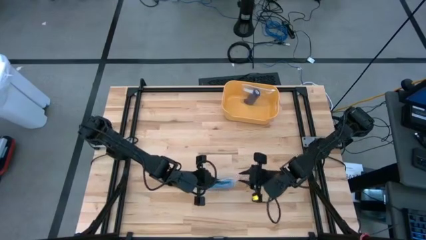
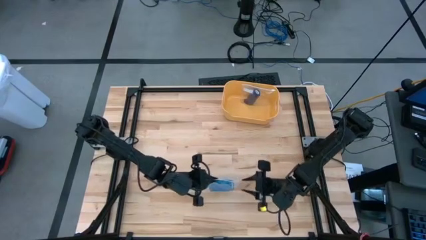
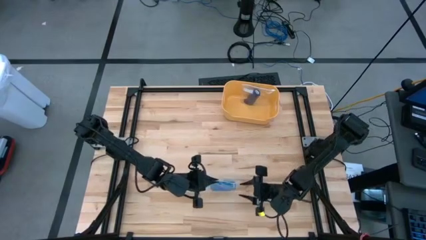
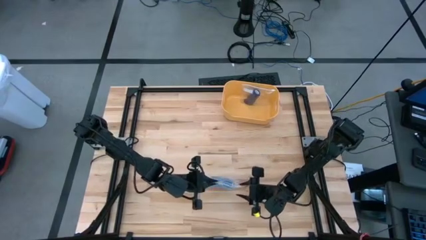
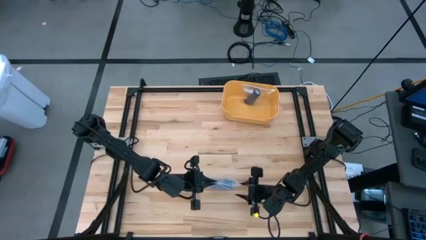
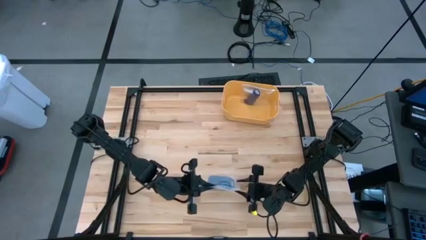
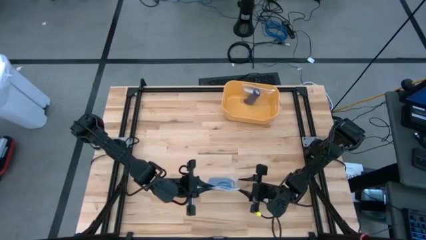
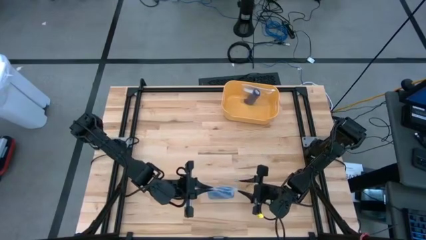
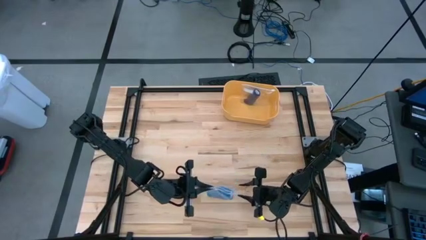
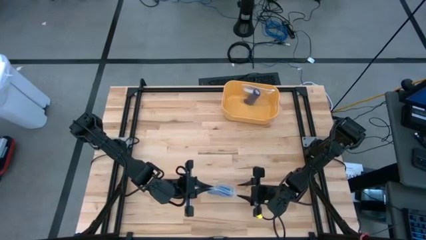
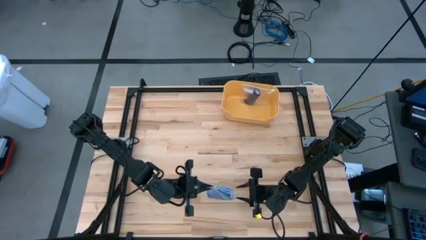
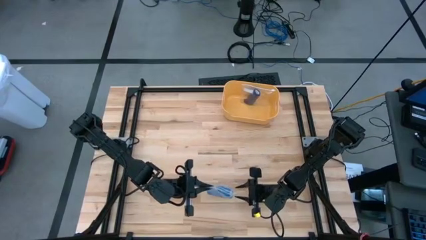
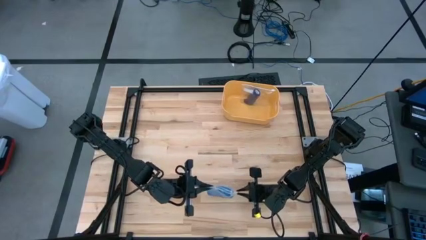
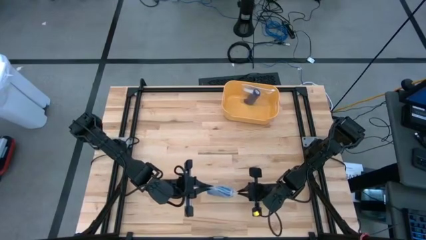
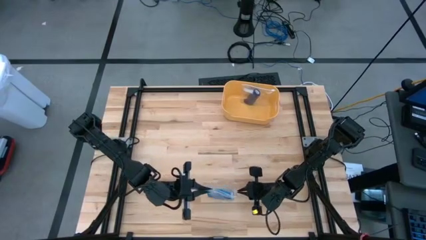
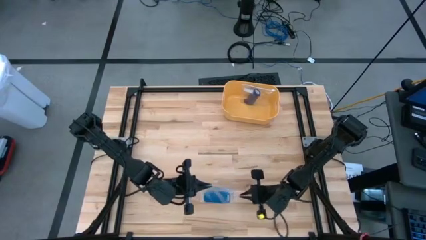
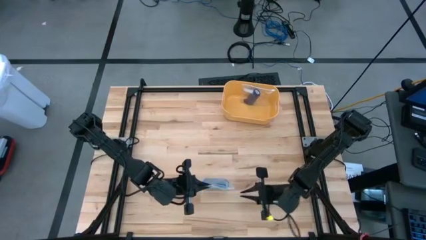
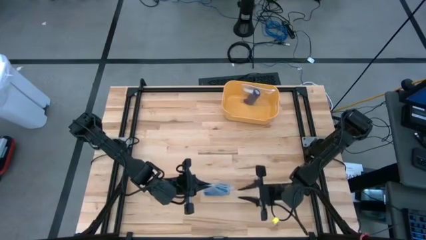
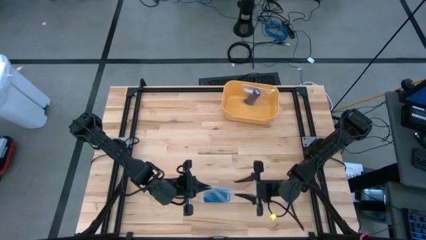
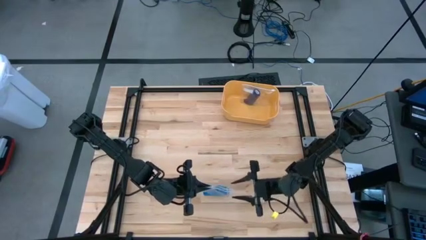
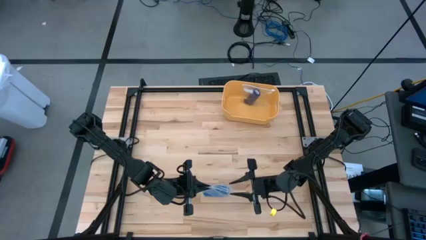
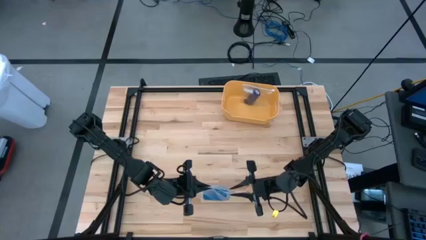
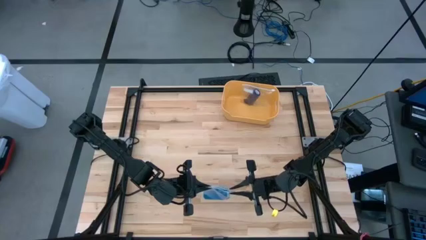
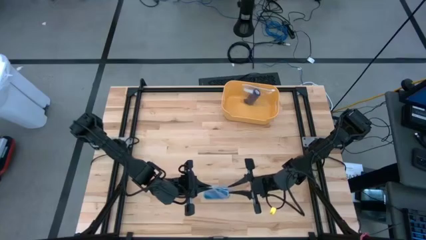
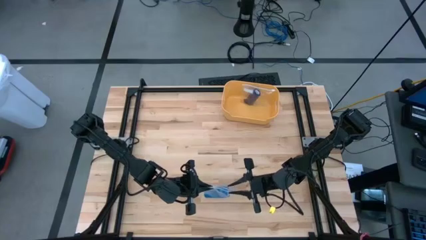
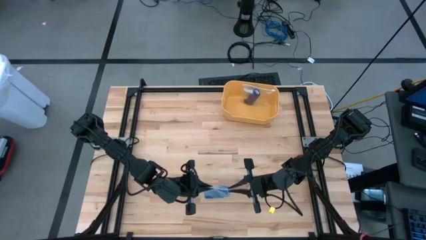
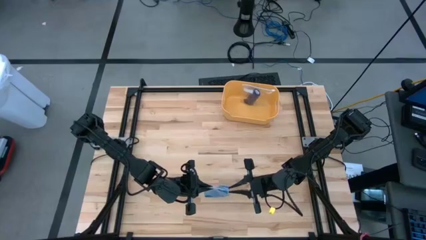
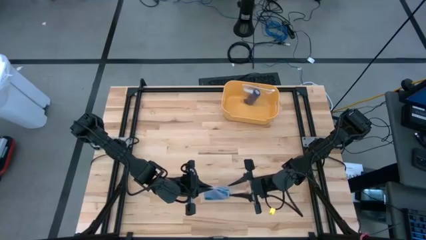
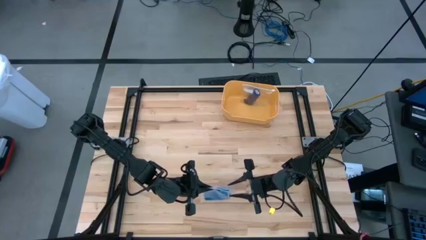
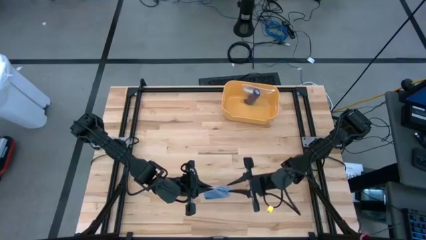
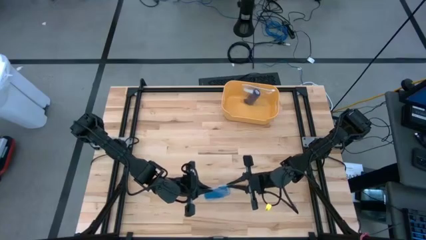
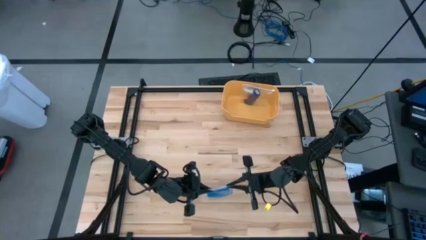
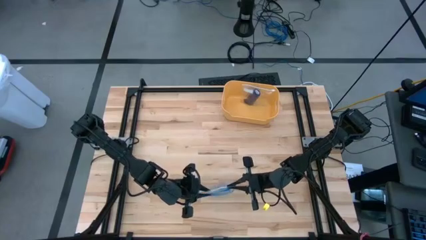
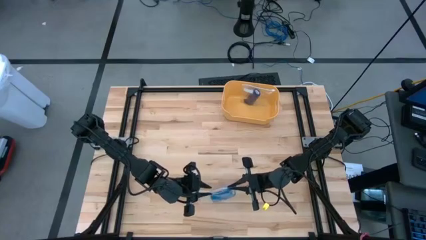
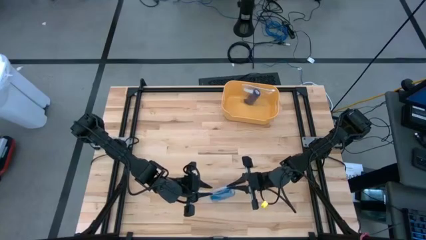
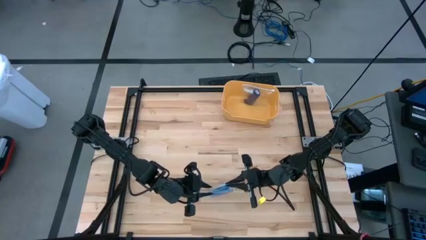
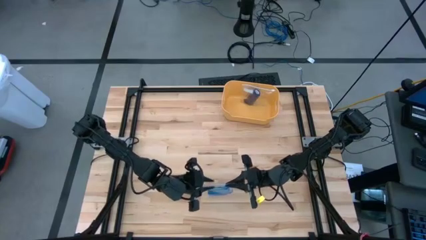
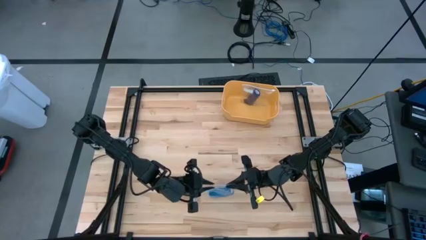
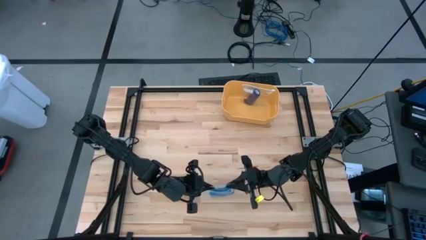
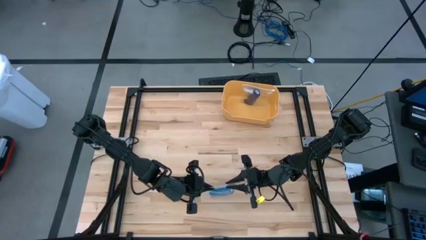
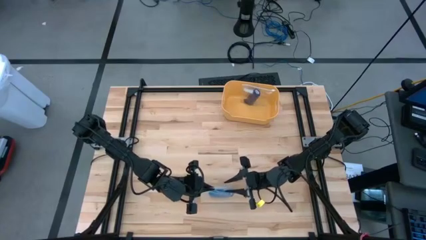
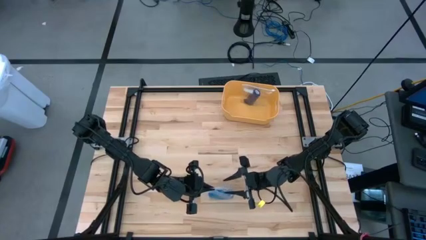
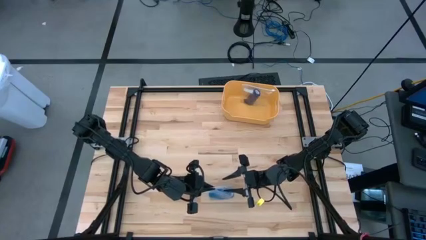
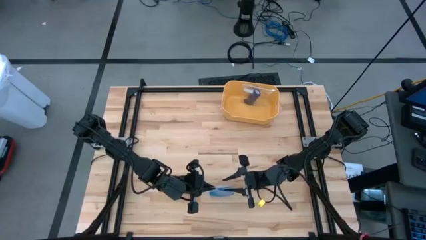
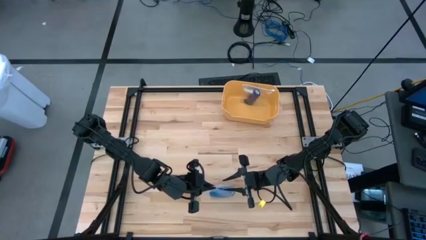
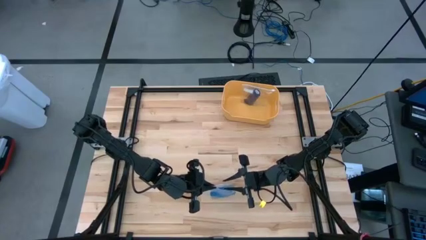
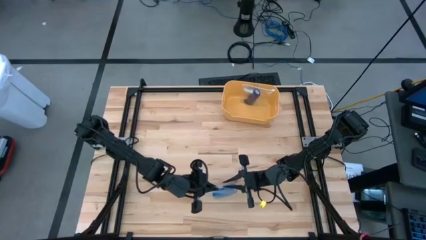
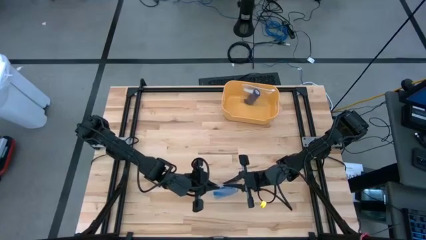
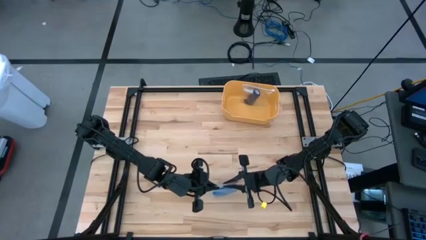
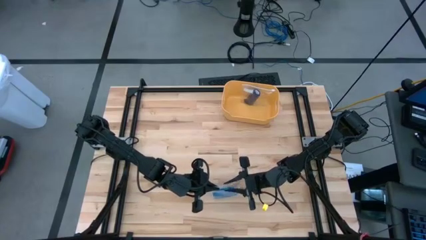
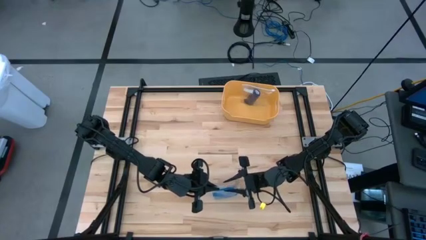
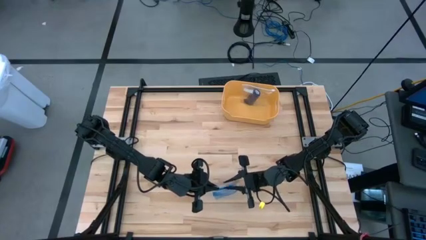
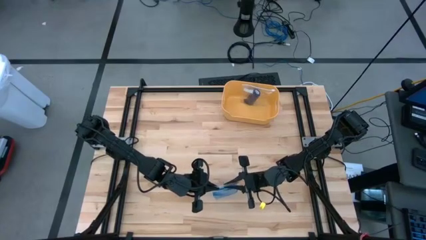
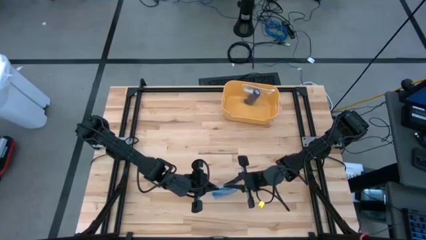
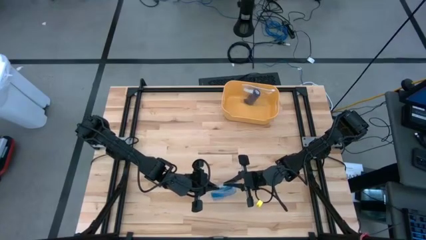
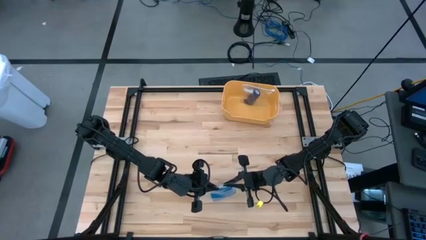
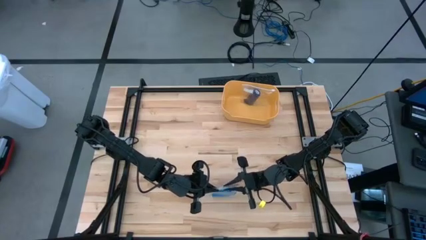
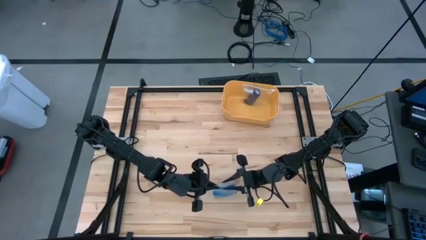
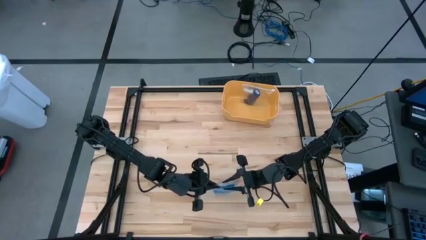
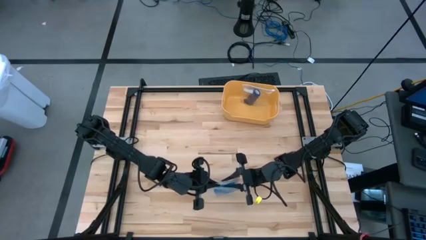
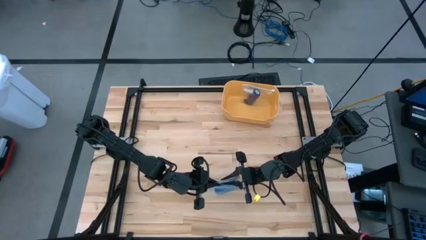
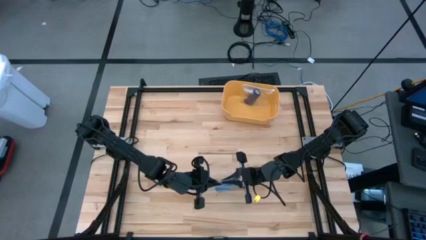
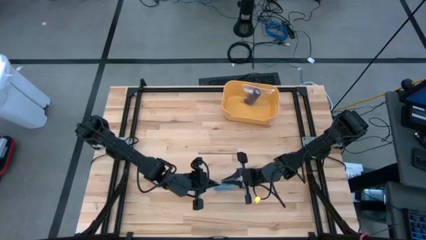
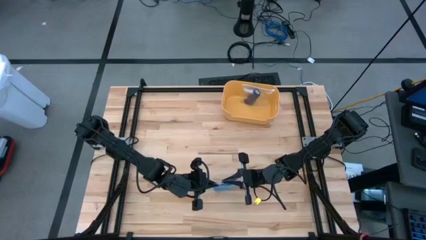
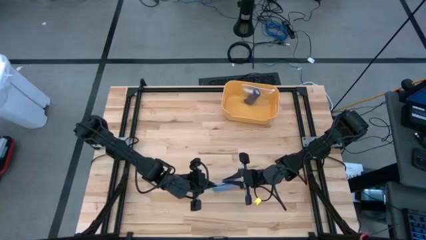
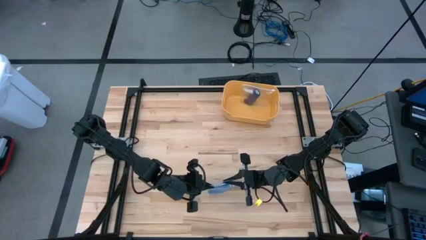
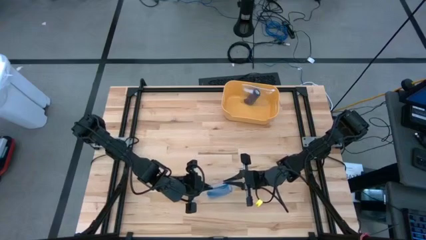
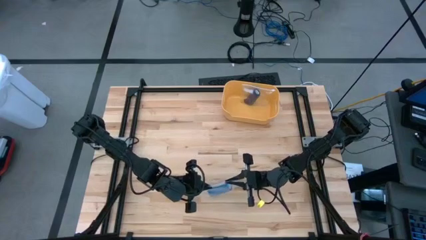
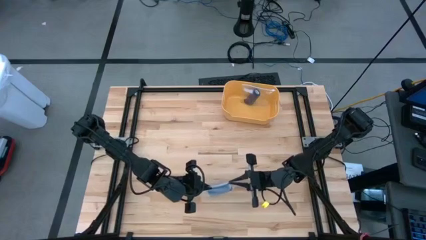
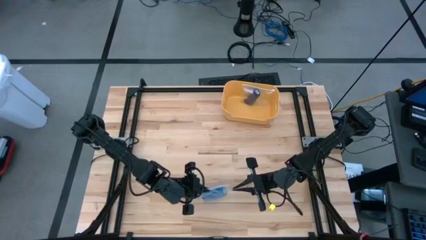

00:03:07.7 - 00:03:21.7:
Task: Roll bandage
Close the transparent zip bag

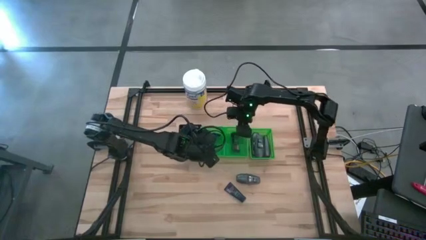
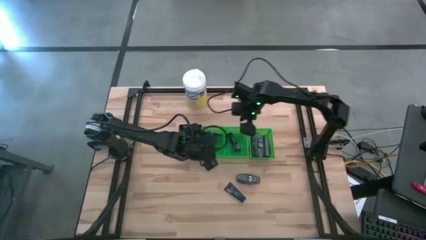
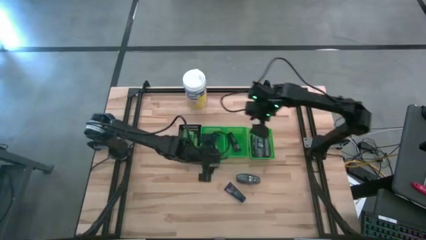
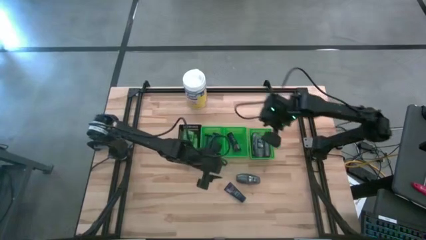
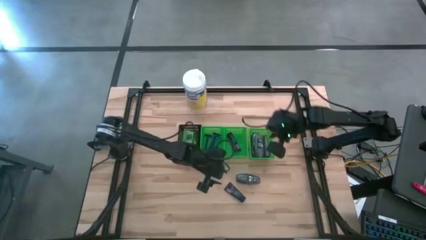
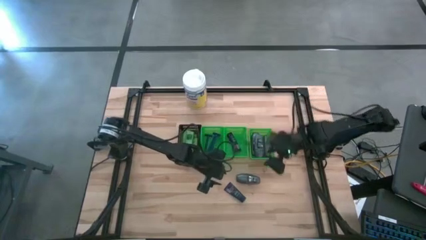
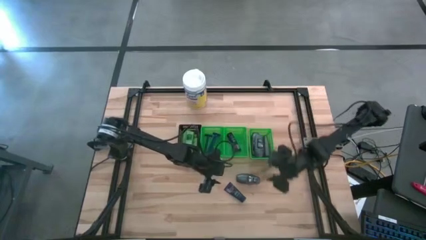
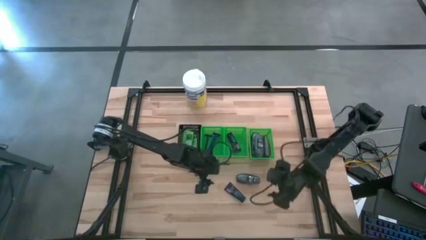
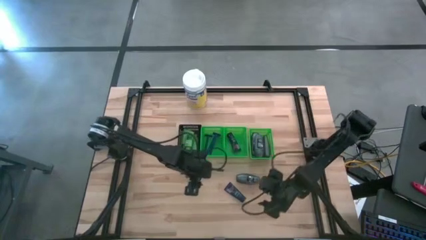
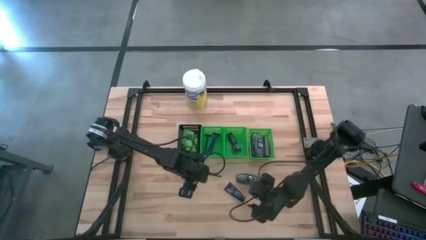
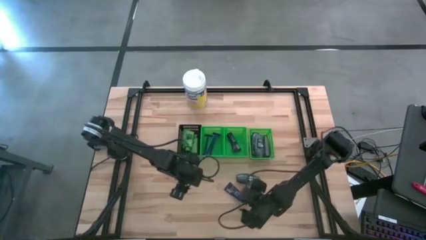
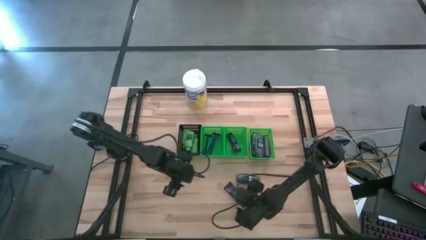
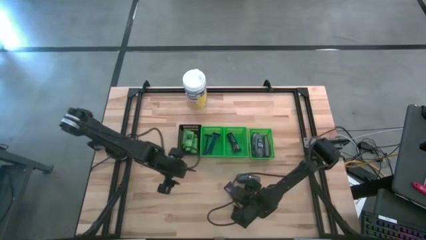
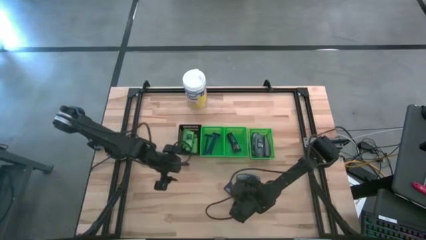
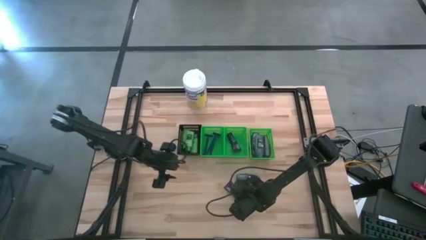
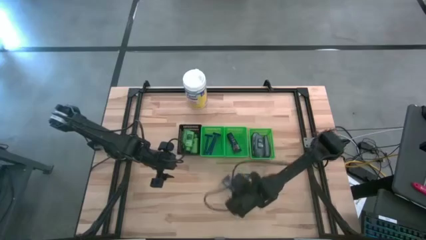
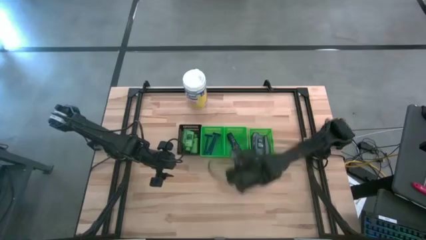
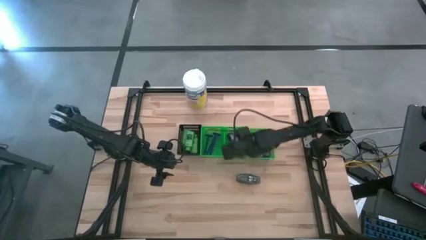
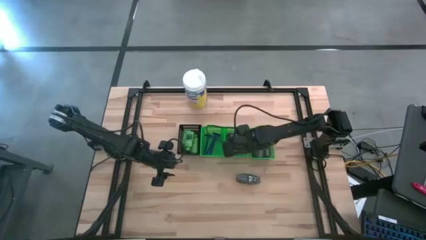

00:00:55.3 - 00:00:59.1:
Task: Pick & Place Travel size toiletries
Put the shave cream into the middle green bin
